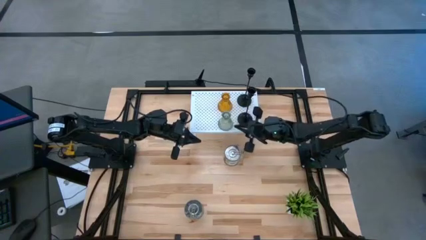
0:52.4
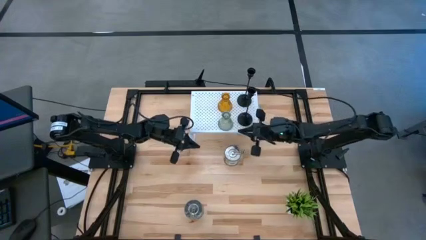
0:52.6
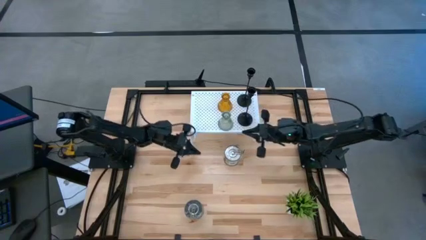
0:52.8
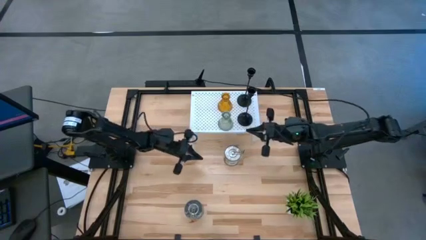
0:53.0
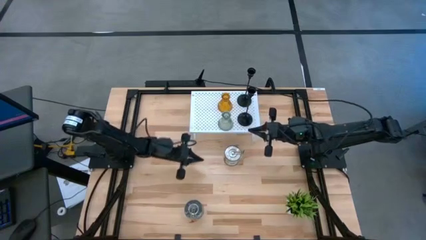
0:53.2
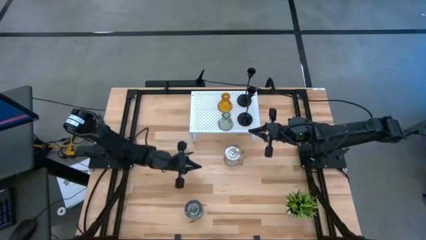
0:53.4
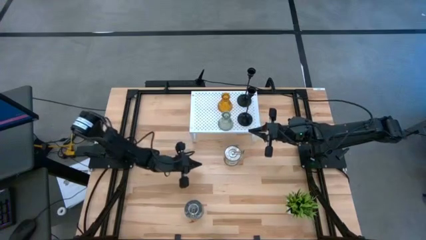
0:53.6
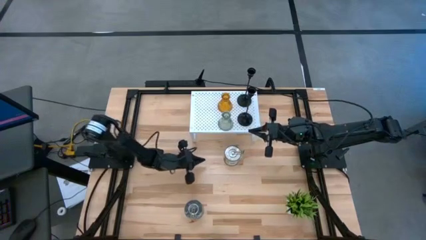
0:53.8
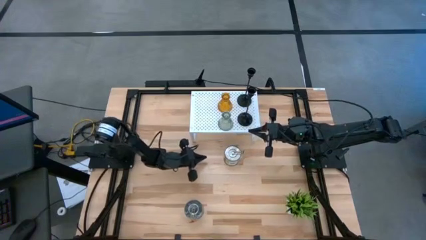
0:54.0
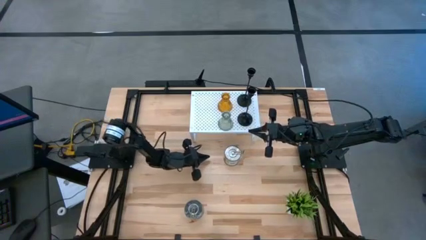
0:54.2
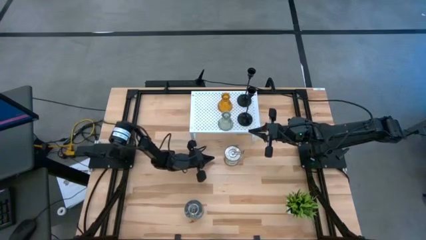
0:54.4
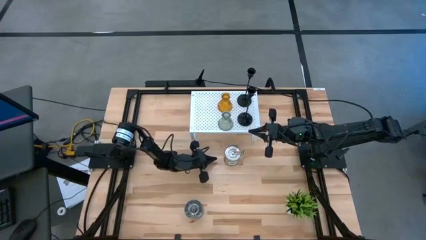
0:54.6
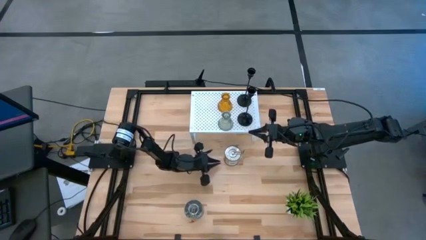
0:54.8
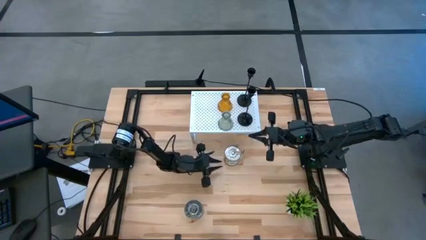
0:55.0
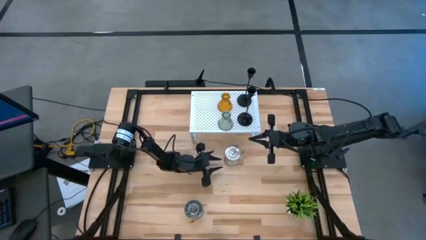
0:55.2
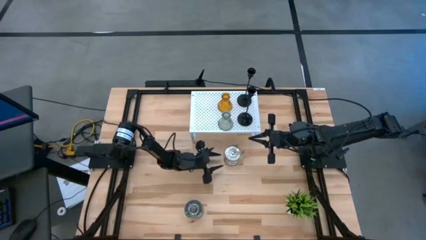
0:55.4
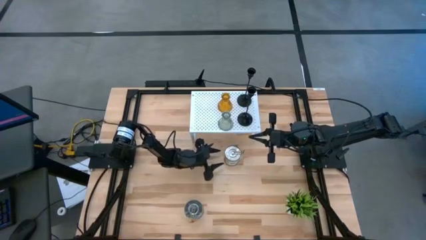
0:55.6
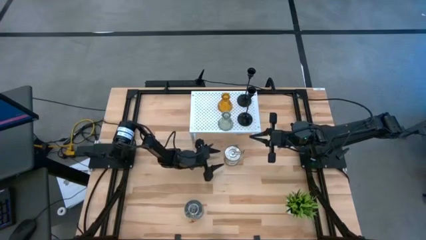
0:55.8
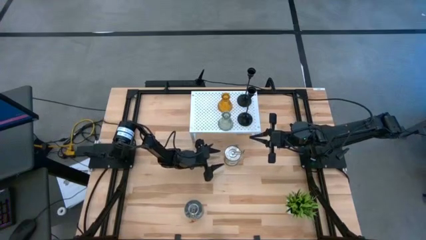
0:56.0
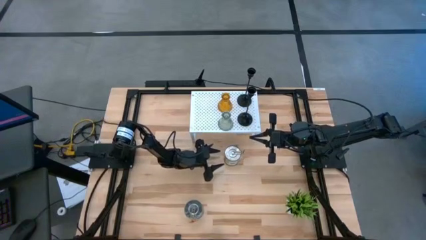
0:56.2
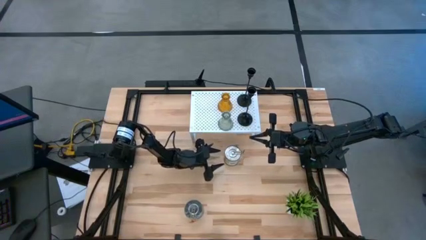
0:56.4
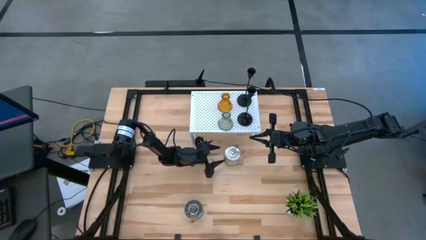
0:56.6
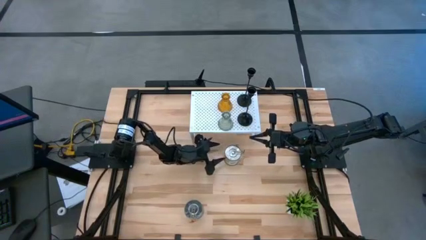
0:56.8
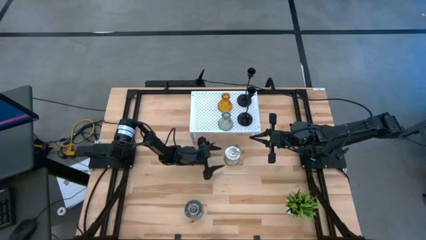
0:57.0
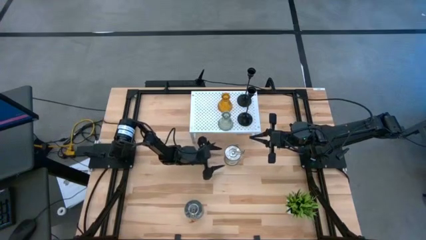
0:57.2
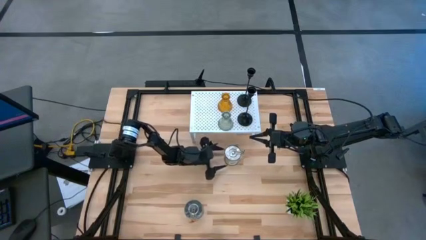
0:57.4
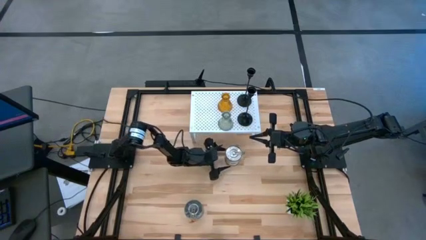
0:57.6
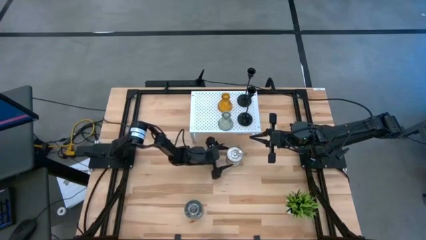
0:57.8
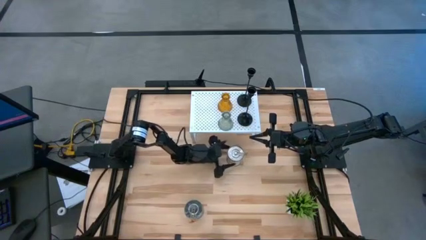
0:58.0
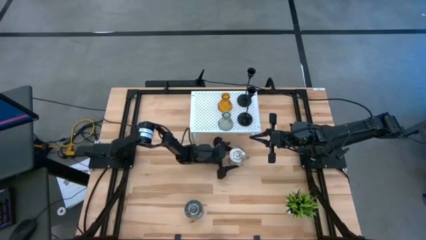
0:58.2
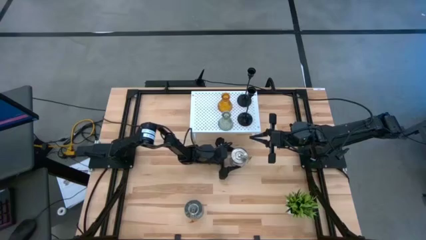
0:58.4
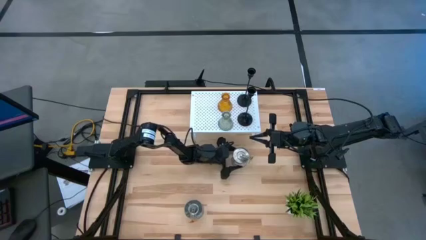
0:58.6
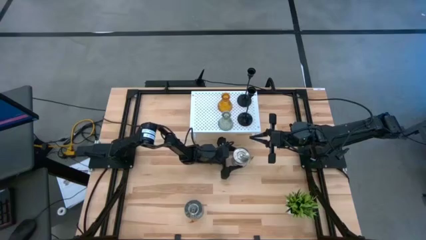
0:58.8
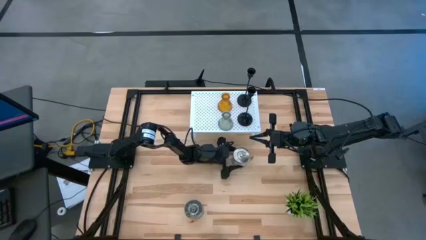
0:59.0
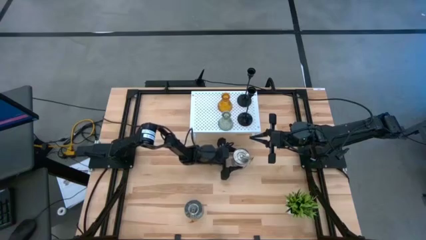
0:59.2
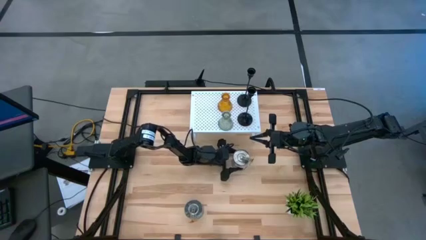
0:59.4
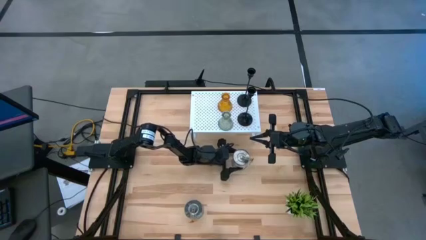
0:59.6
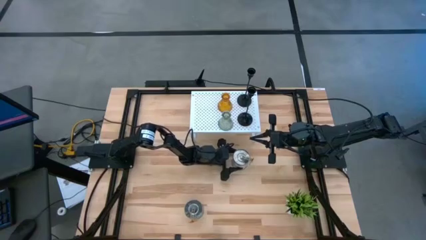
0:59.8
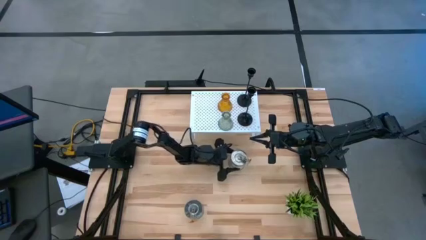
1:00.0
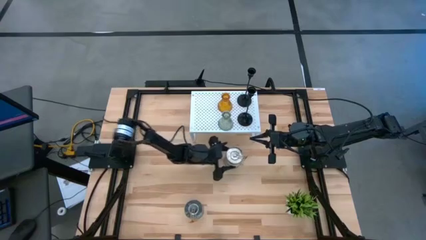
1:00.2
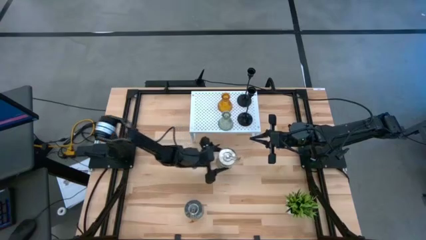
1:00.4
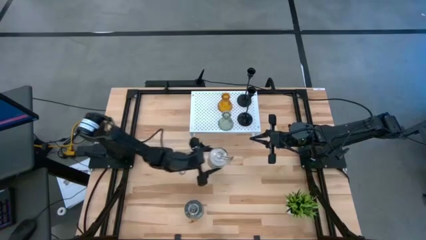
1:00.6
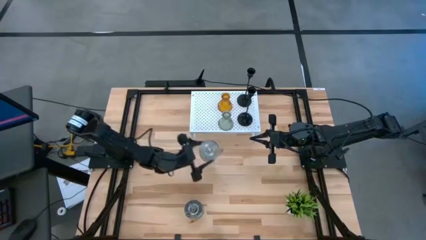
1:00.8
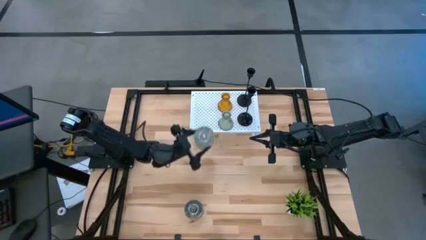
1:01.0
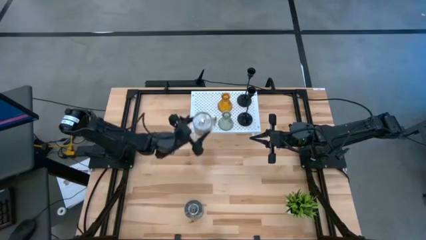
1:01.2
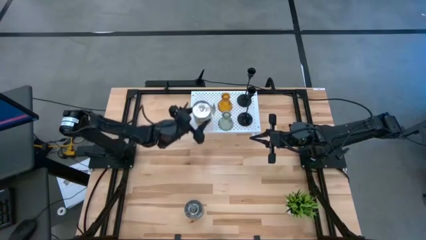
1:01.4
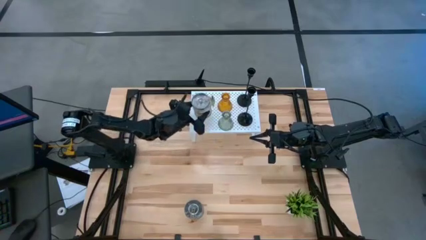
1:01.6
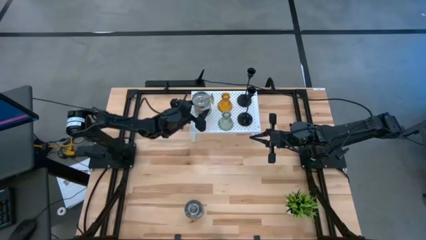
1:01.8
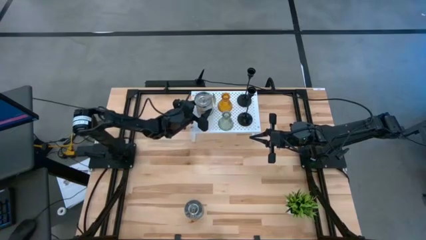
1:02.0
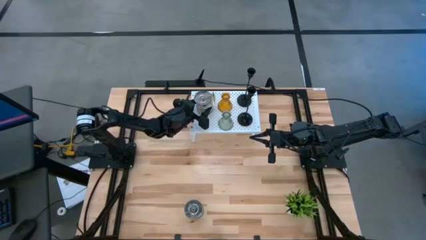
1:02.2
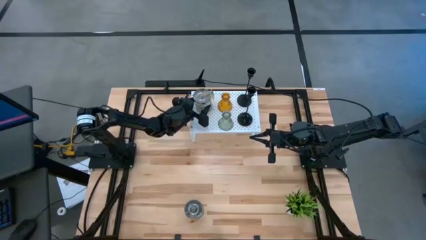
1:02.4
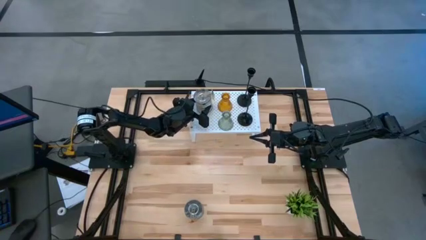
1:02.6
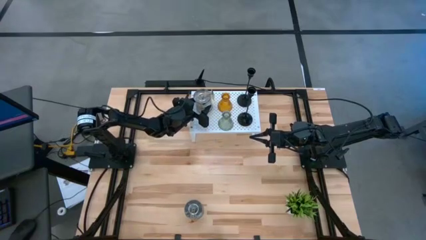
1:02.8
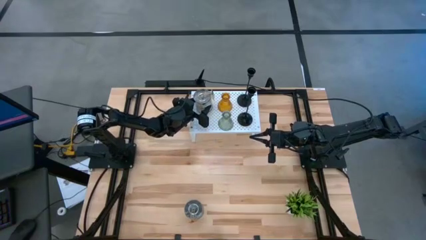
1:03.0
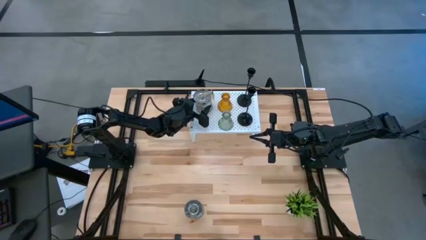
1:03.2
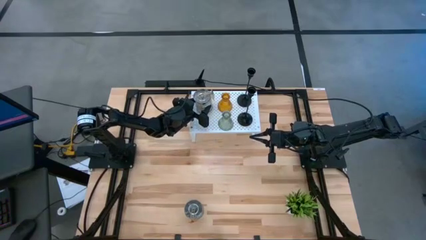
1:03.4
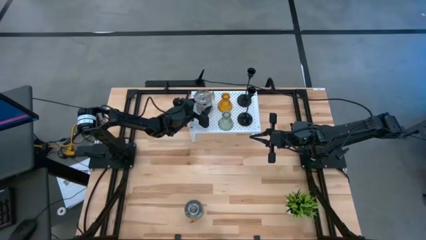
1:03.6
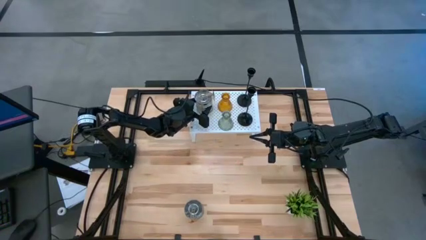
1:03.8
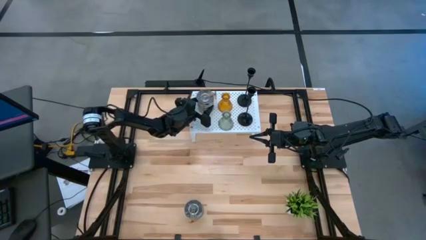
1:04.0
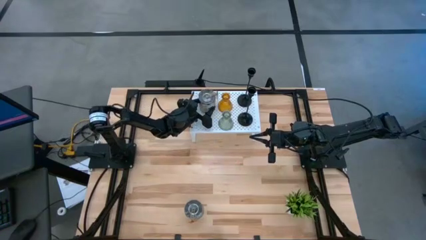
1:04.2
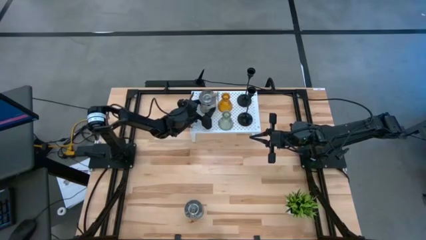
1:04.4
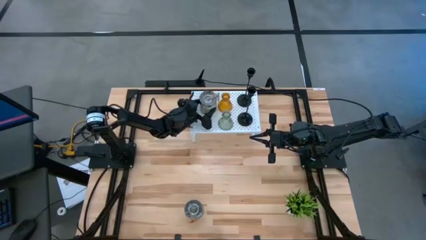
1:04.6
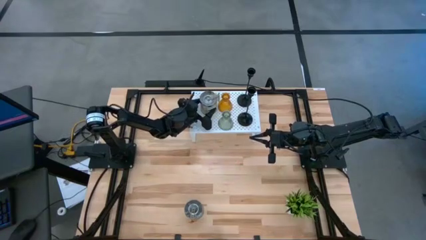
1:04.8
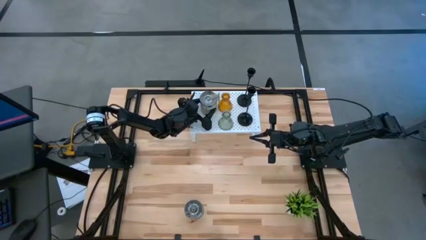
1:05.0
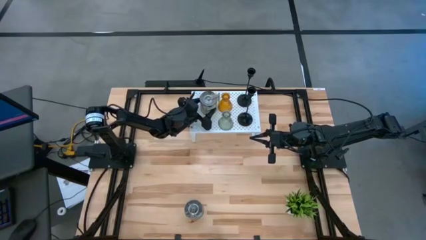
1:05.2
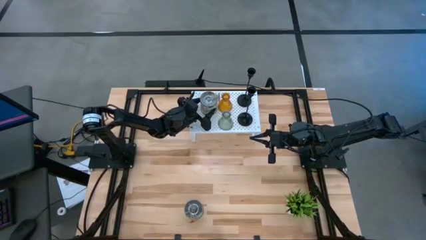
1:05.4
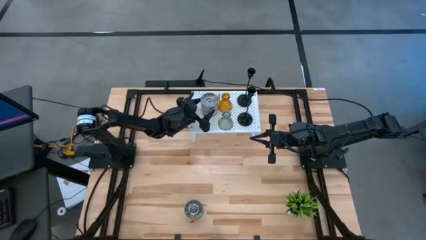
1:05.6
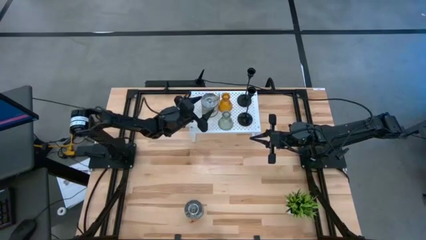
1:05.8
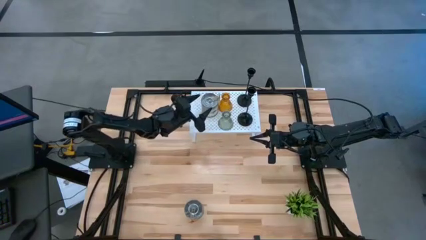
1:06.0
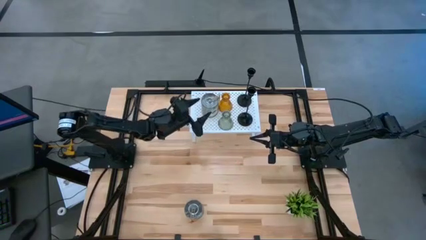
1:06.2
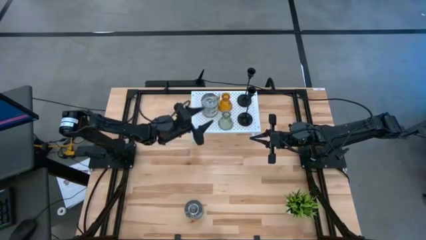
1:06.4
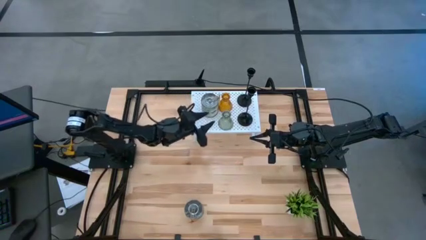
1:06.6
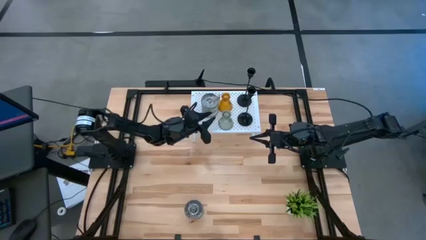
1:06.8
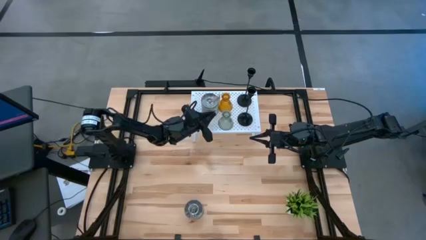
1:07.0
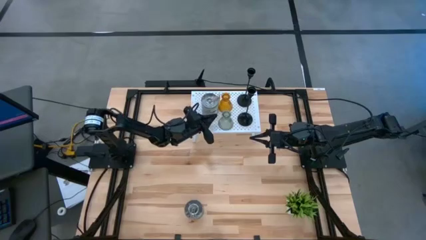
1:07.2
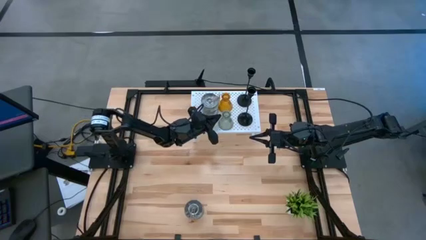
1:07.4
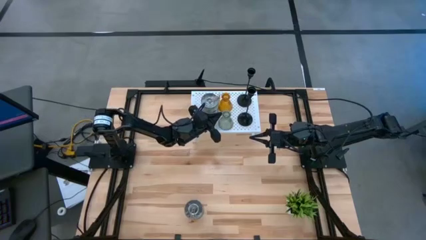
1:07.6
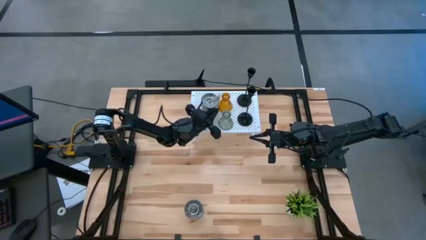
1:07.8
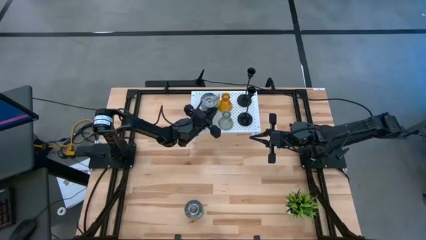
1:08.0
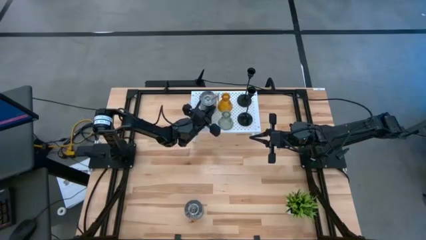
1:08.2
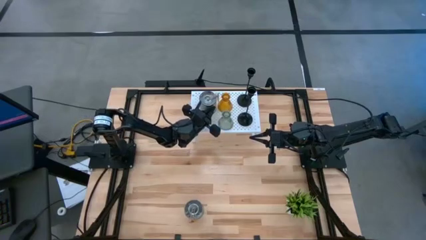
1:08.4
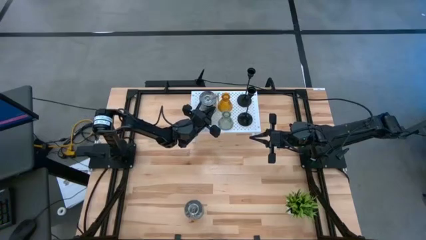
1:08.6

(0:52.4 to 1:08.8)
Task: Pick & Place candle stick holders
Put the green scented candle on the shelf
